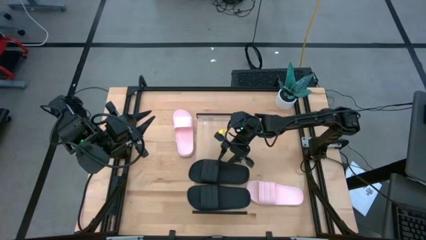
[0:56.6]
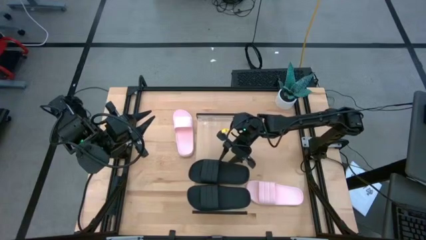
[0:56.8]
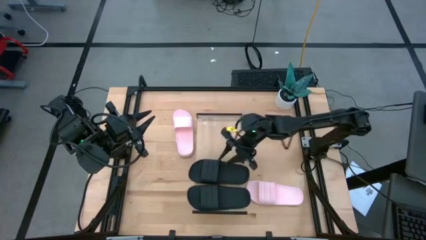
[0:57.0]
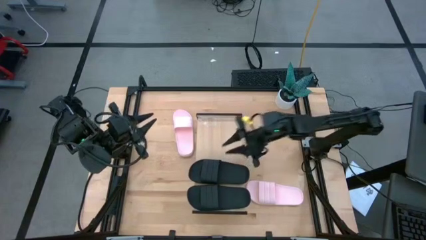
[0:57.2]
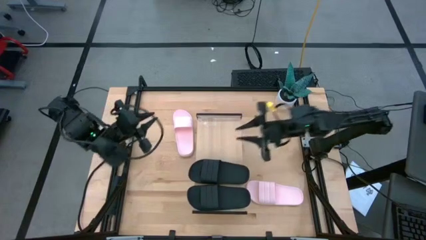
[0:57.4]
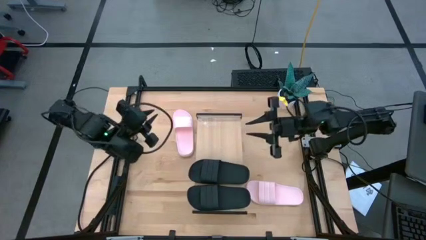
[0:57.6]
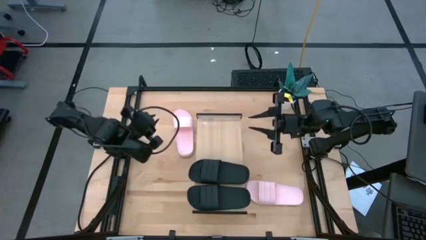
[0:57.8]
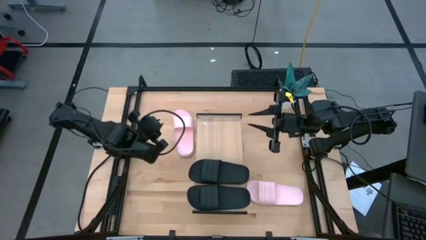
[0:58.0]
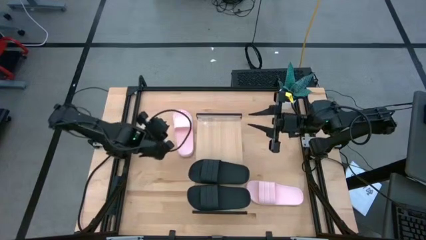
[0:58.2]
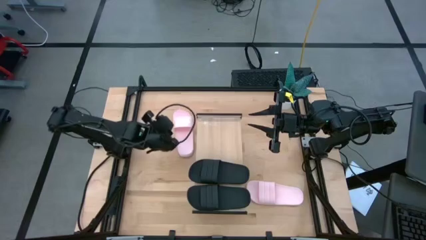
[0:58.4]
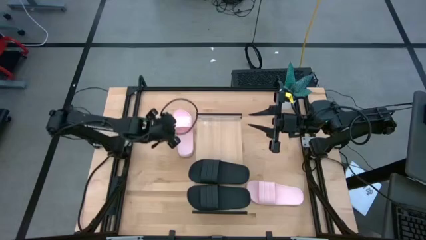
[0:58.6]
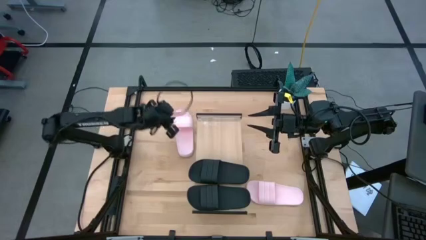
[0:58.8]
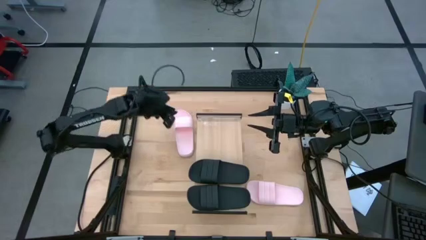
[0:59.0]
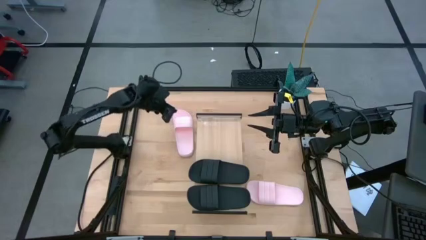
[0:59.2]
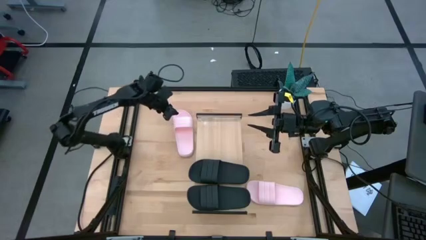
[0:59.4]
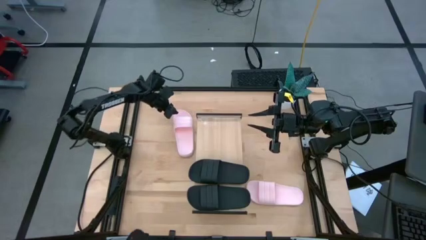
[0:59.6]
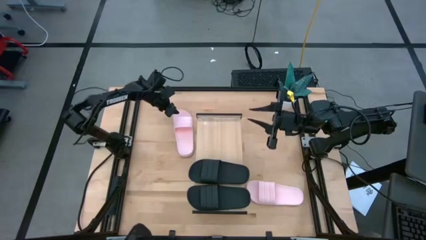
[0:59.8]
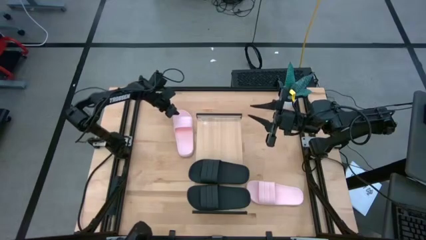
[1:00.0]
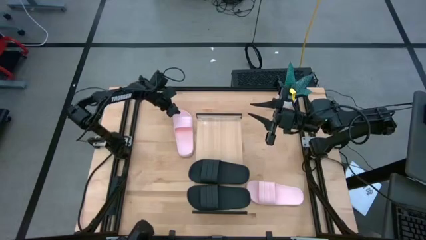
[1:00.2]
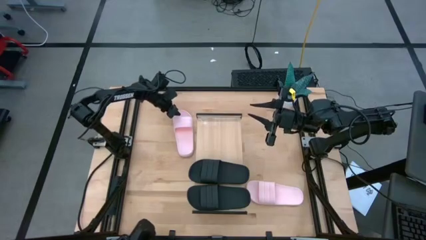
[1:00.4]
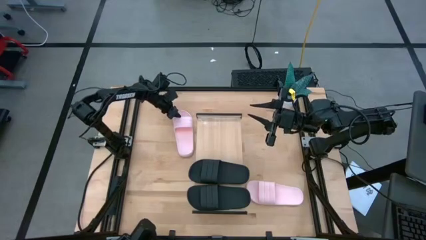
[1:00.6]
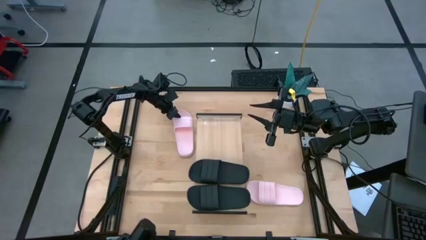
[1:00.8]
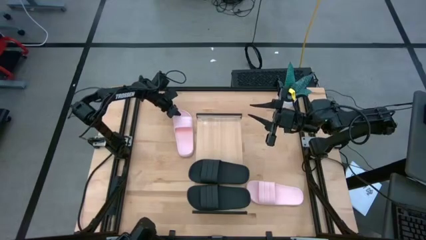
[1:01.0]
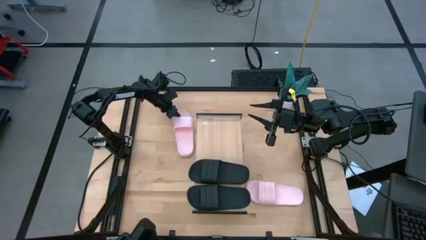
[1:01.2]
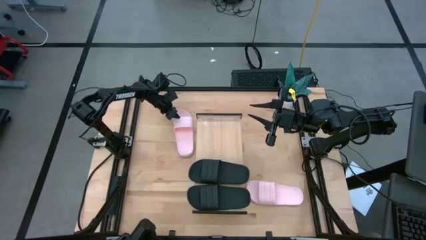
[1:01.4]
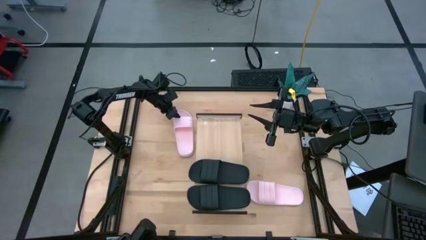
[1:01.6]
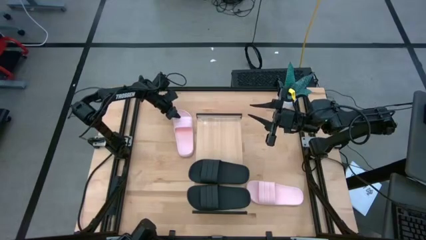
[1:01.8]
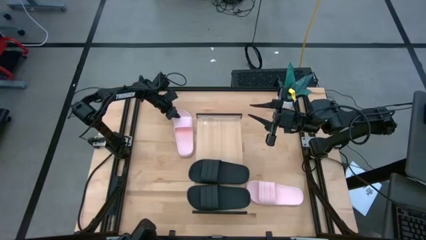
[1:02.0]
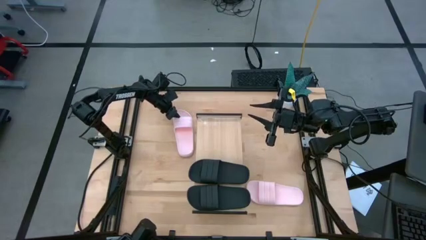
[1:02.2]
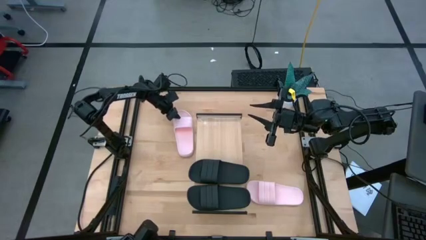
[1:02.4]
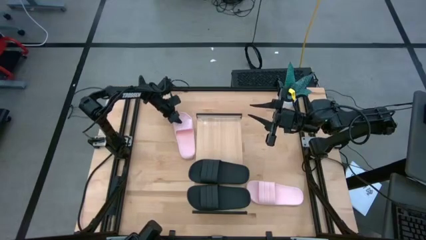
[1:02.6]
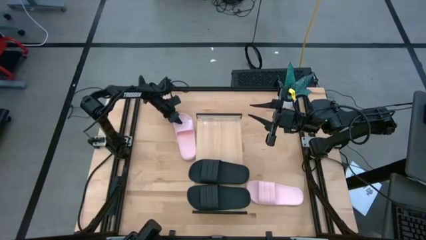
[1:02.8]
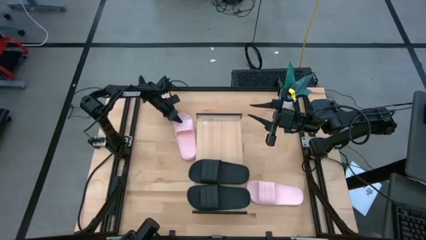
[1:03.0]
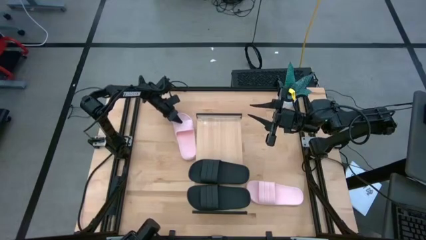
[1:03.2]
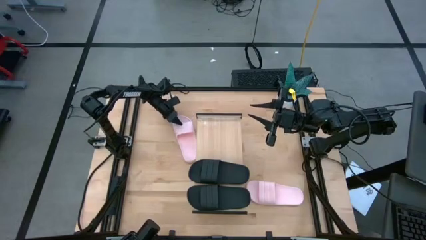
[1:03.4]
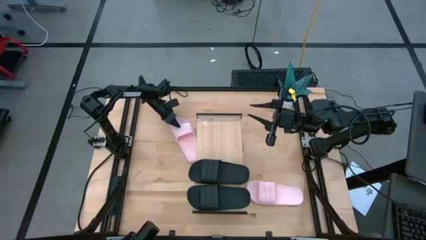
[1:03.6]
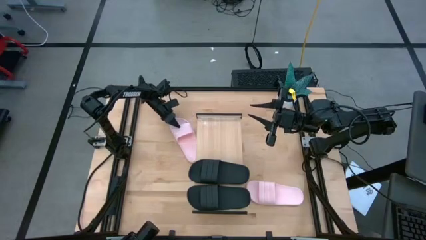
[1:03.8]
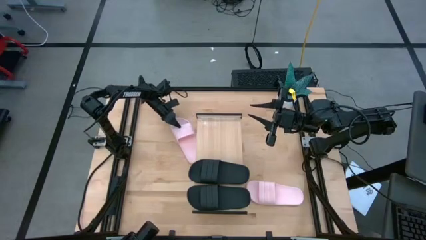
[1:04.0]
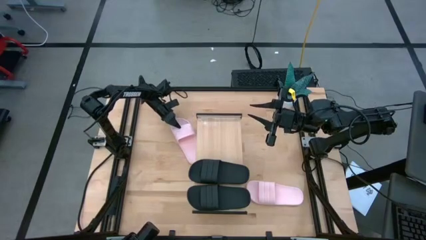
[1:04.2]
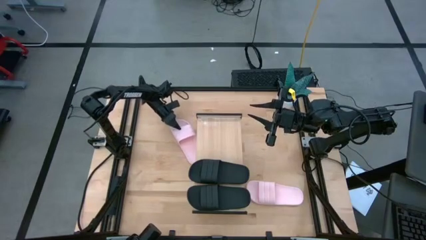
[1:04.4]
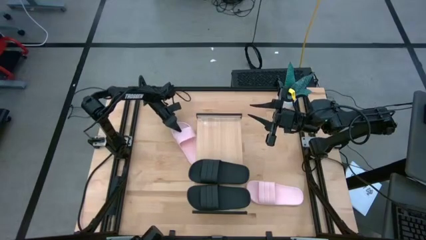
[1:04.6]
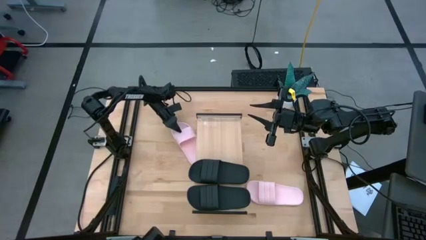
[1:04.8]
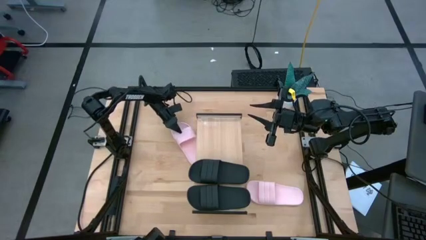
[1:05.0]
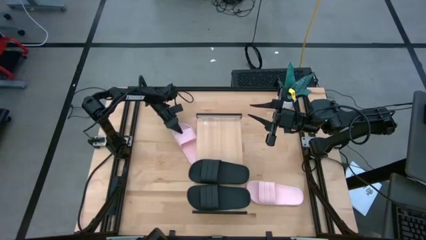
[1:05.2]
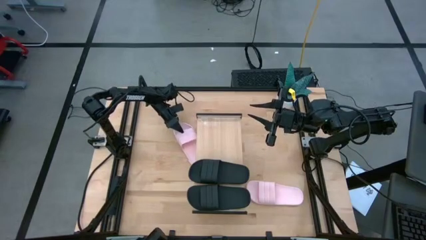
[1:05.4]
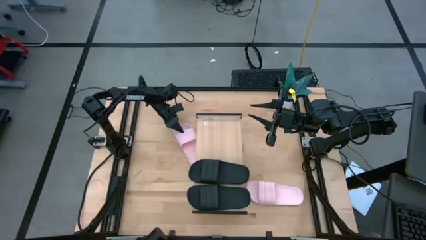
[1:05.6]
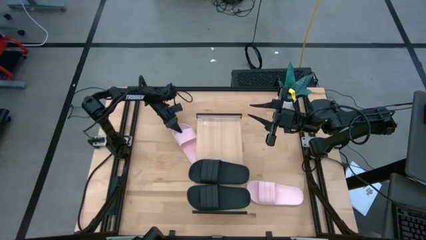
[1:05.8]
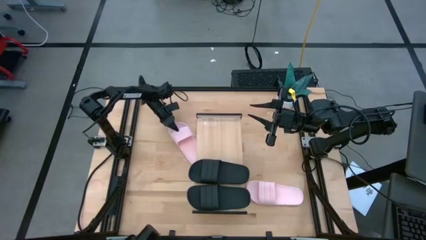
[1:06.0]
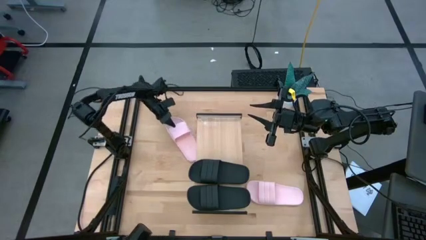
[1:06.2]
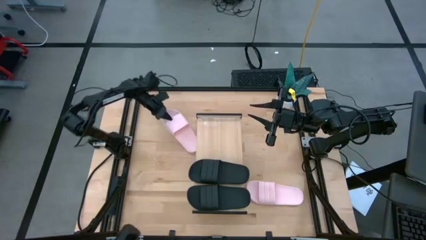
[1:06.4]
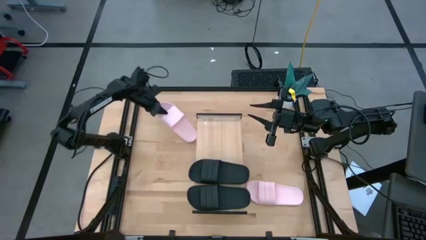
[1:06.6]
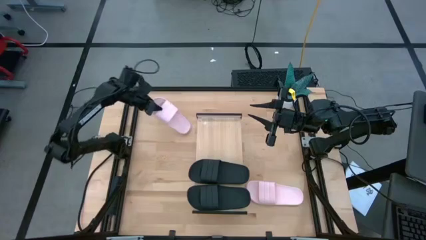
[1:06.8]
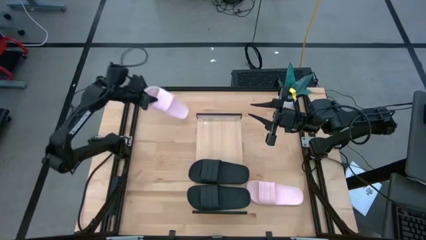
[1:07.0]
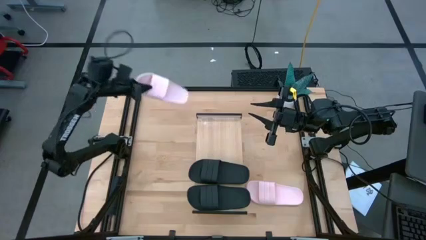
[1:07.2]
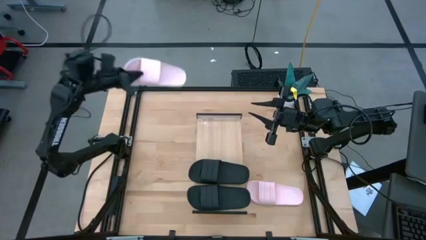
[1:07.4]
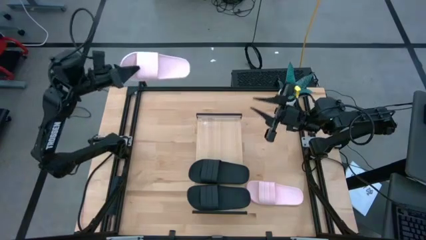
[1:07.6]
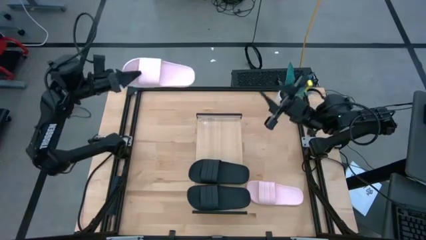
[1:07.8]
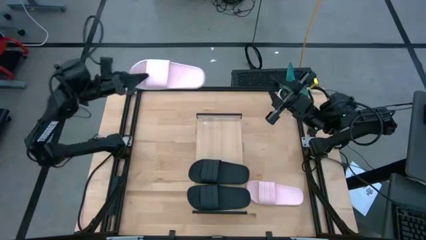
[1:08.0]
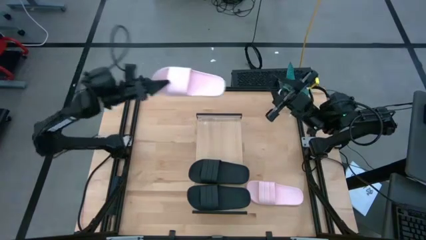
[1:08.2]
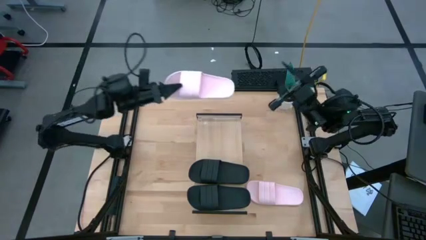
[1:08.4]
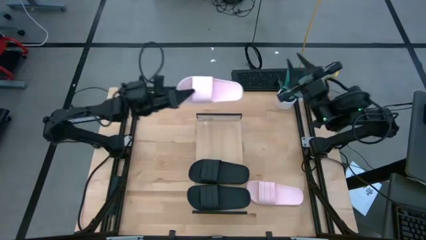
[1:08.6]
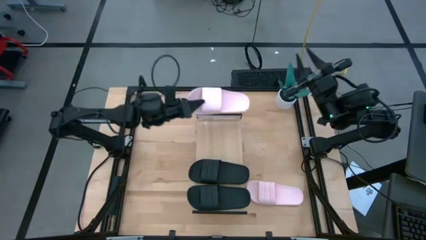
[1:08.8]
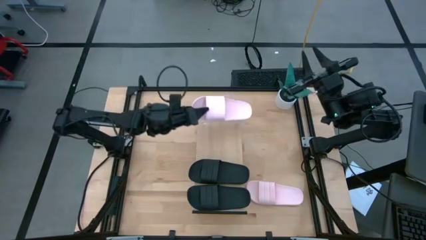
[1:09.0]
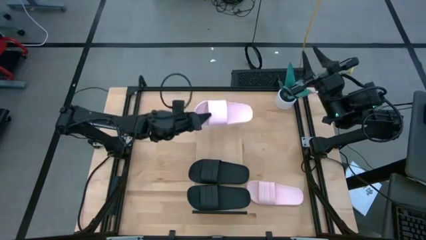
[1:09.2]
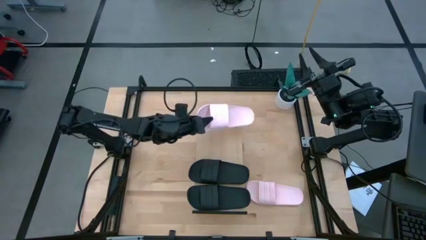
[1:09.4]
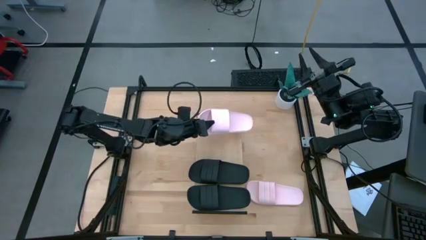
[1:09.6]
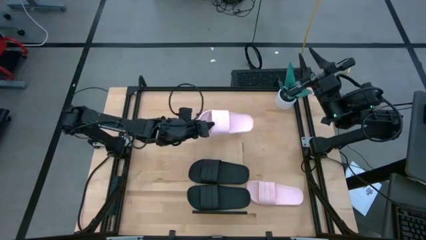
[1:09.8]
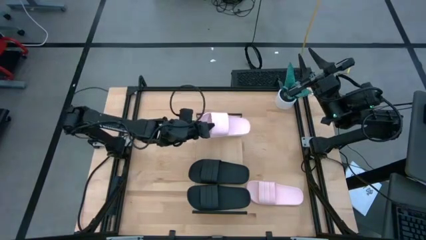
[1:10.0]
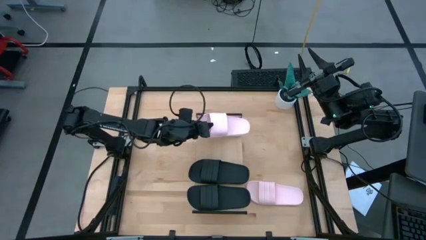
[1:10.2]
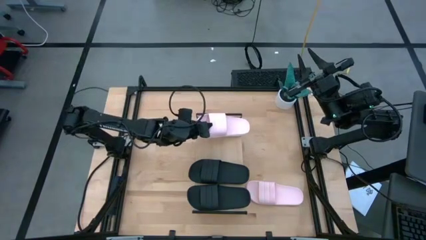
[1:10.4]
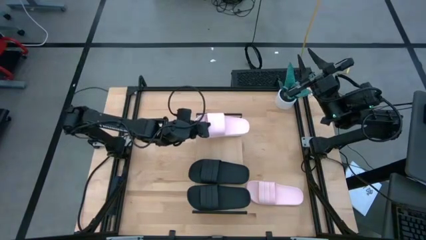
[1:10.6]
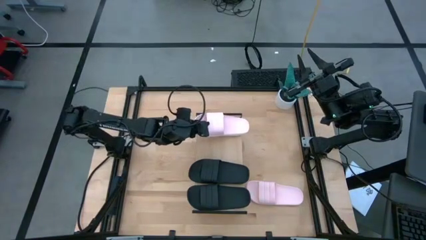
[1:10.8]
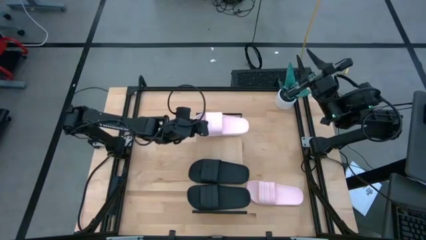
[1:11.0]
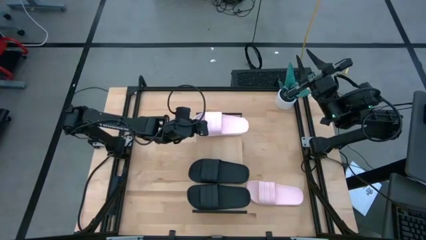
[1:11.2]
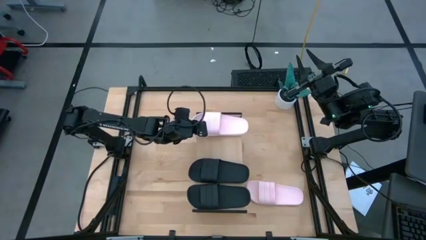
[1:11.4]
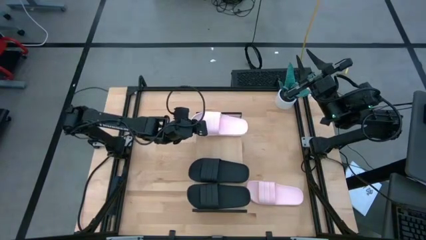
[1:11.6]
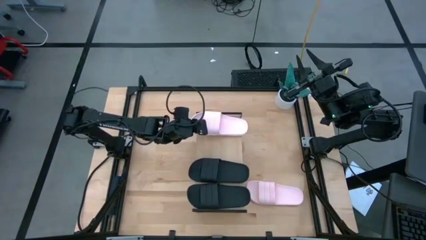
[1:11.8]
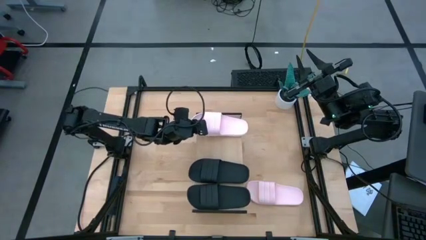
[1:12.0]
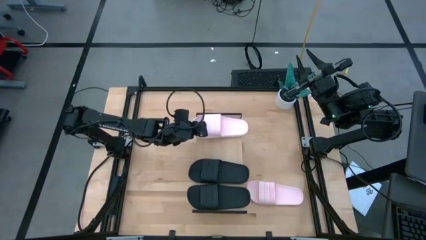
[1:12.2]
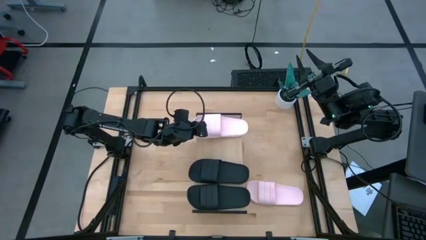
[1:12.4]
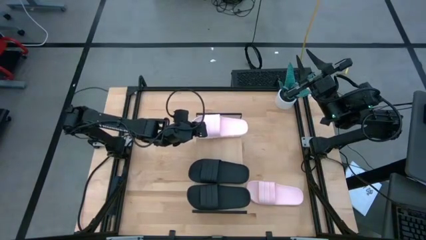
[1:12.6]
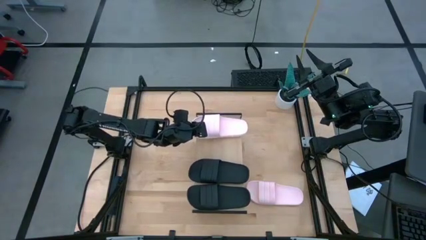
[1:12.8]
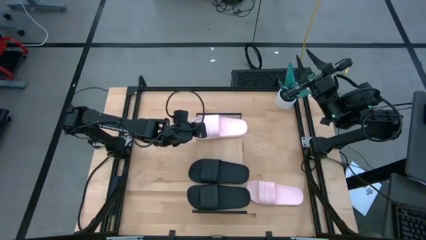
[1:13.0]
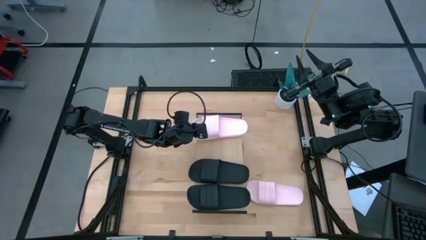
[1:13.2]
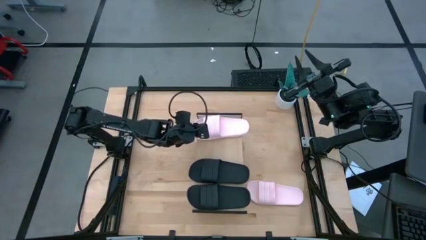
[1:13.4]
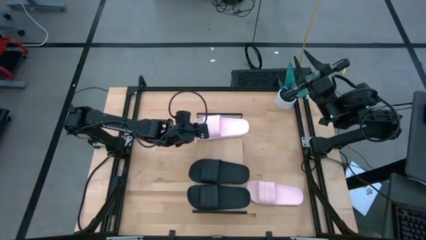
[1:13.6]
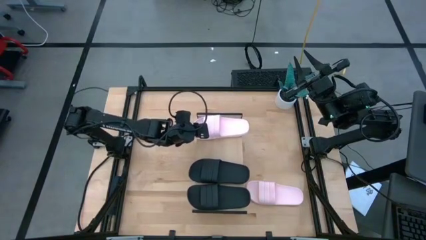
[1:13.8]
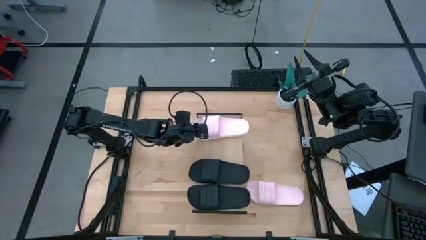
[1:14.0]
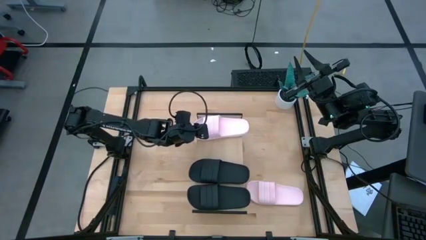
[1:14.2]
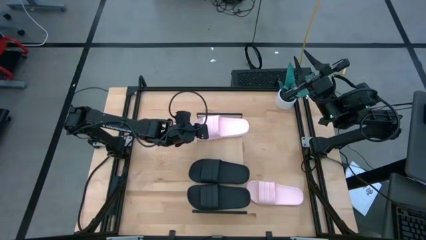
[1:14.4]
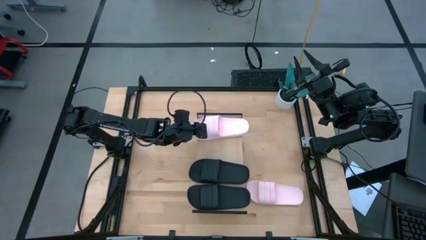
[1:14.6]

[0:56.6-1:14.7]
Task: Pick and place slides into the shelf
Put the top pink slides on the shelf
